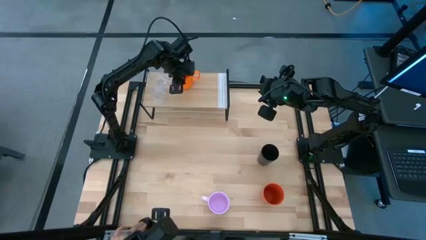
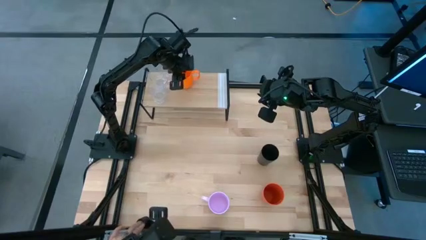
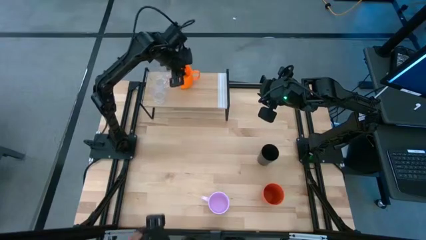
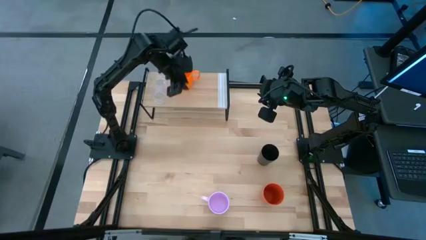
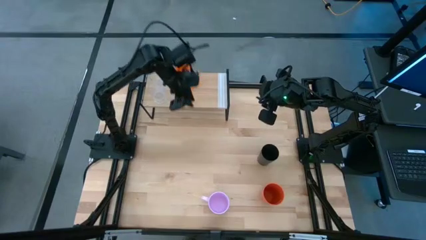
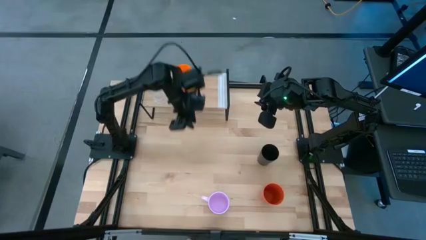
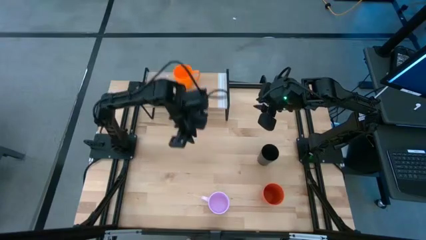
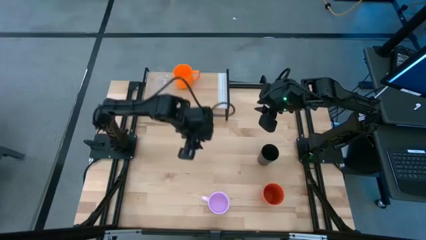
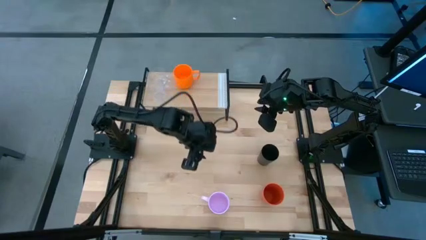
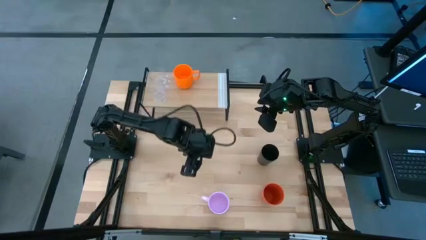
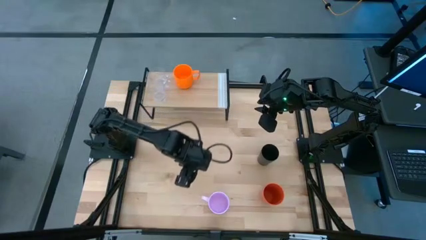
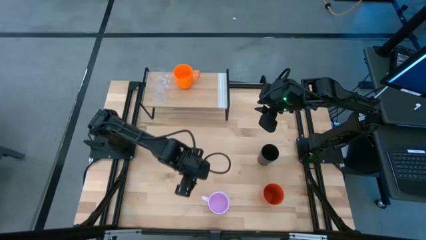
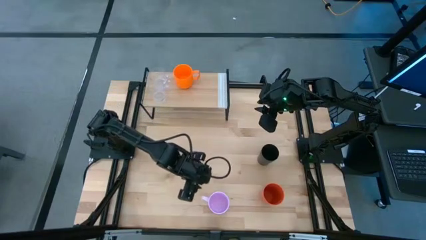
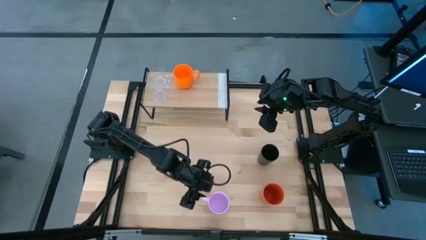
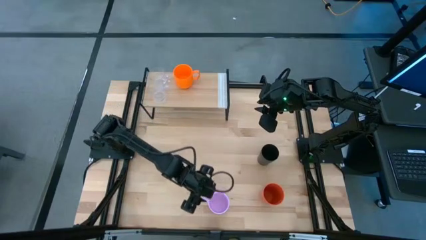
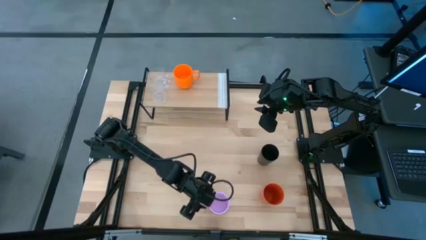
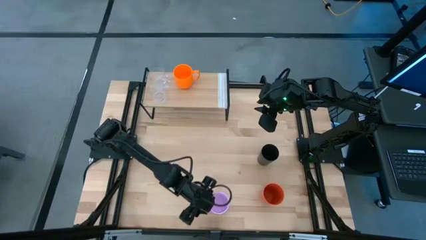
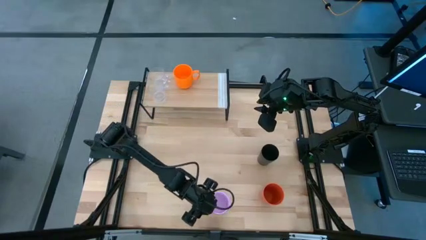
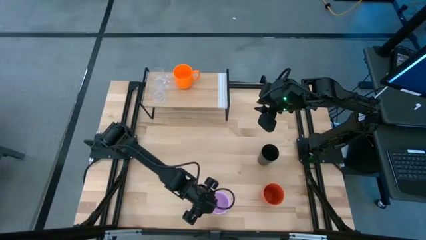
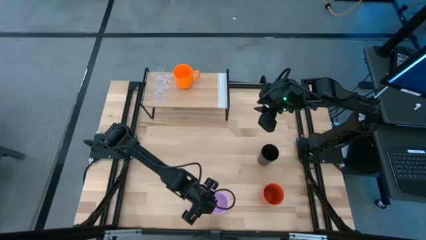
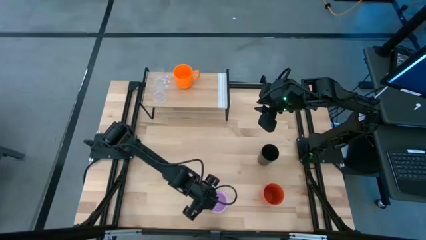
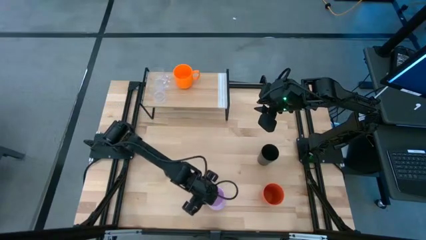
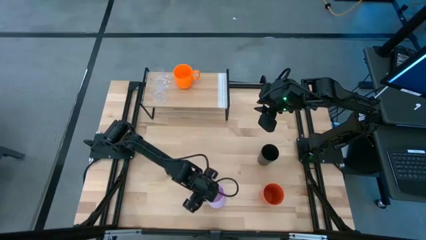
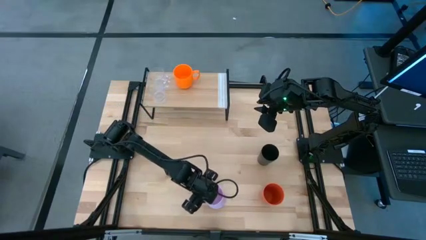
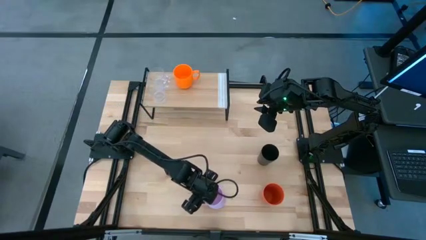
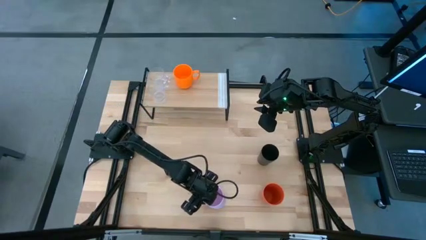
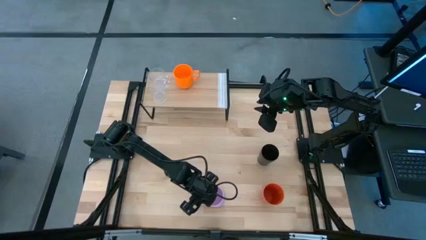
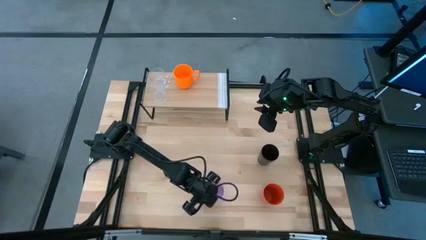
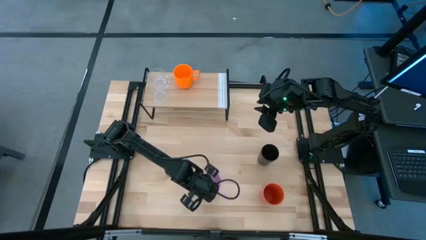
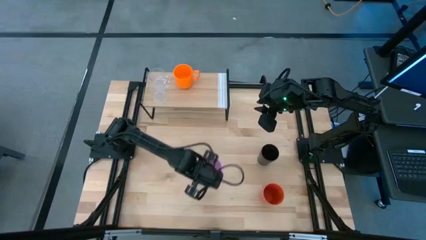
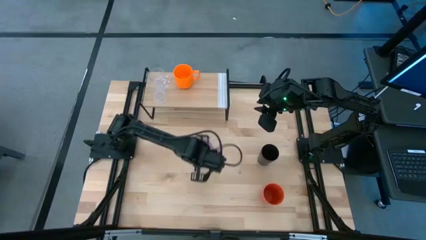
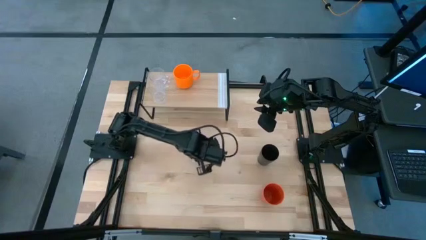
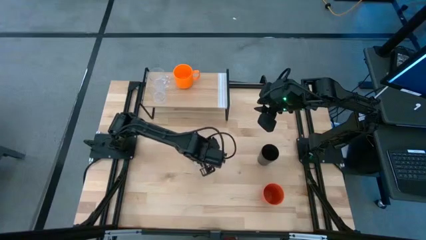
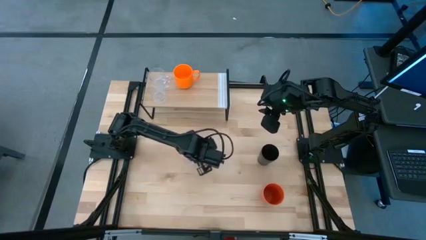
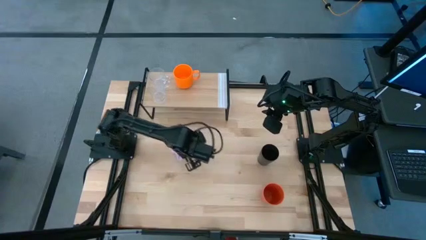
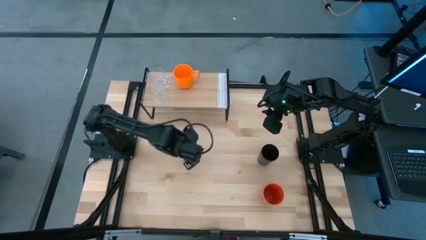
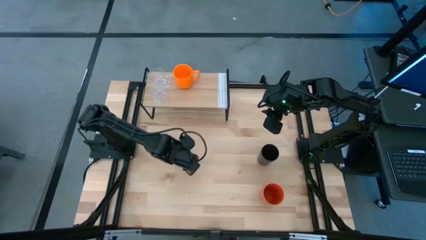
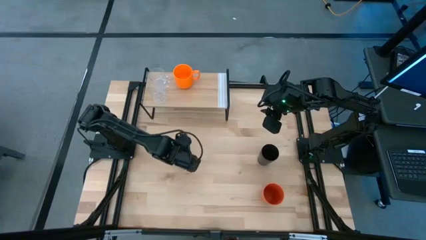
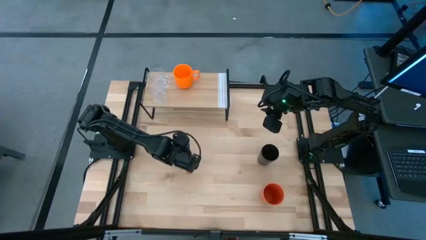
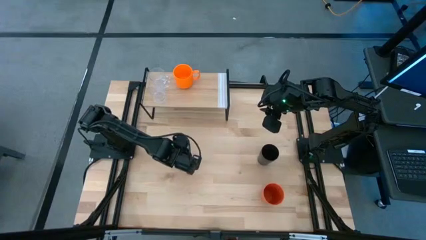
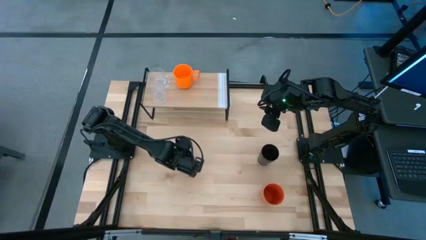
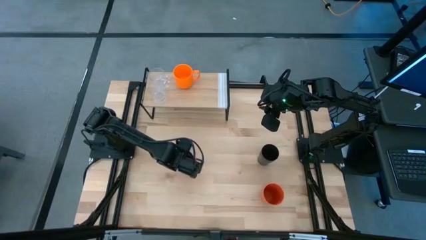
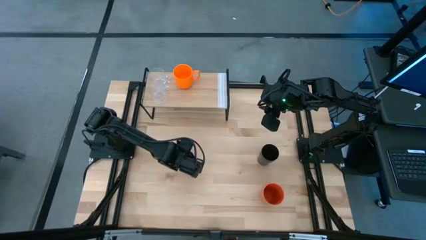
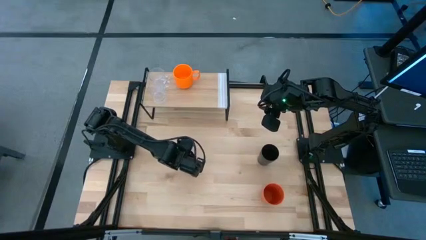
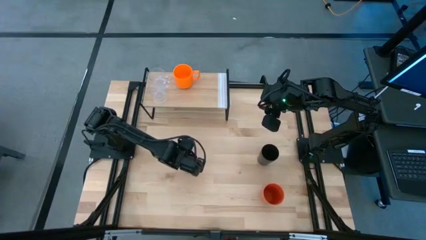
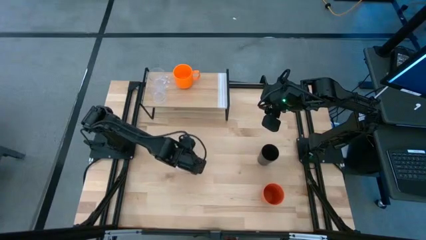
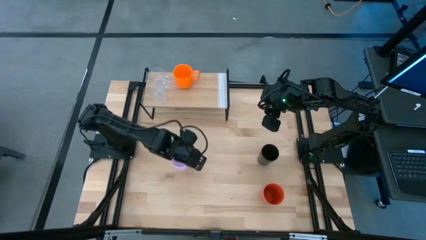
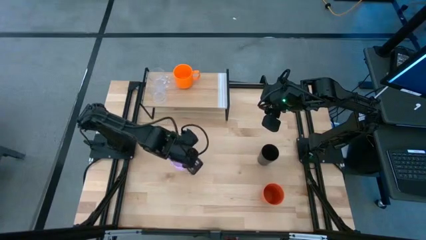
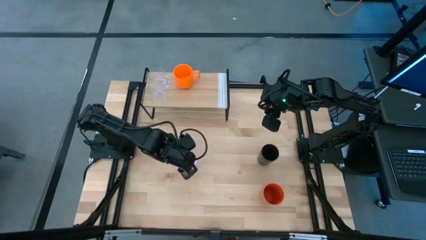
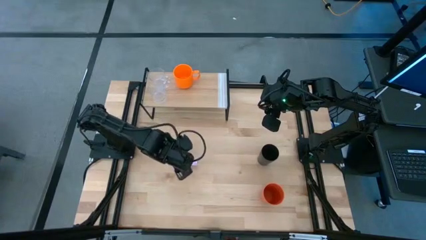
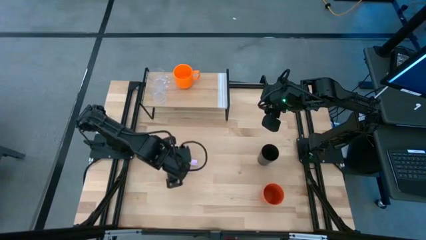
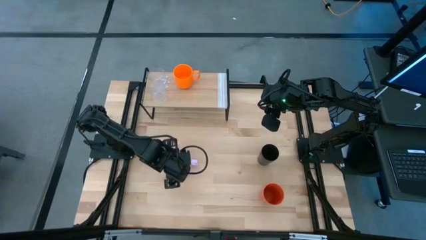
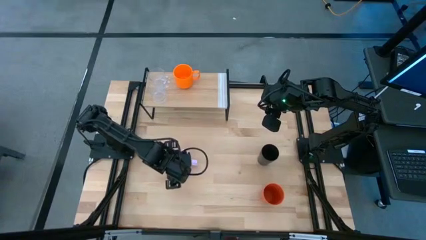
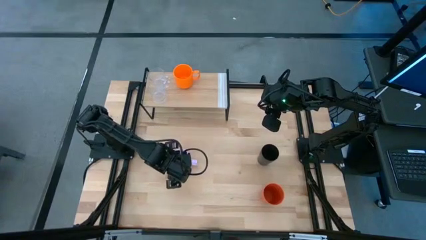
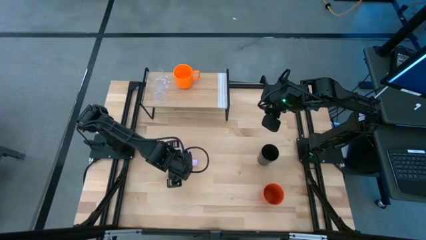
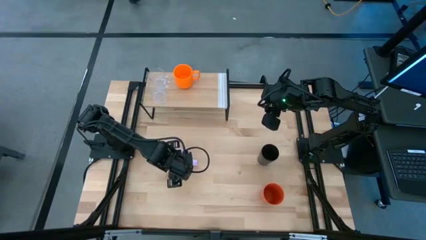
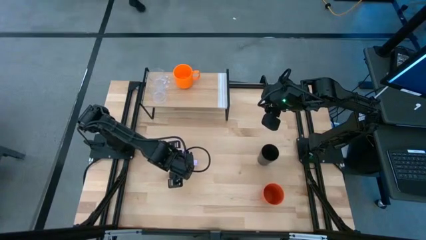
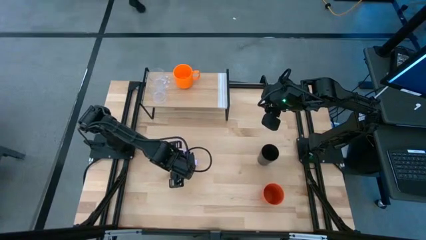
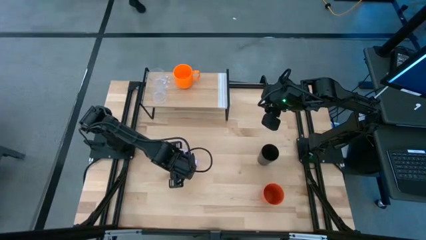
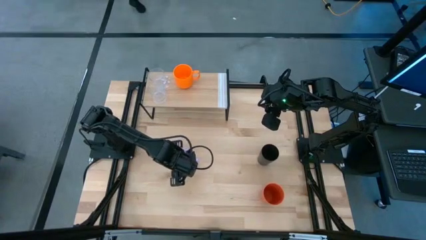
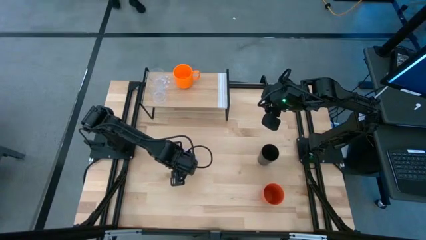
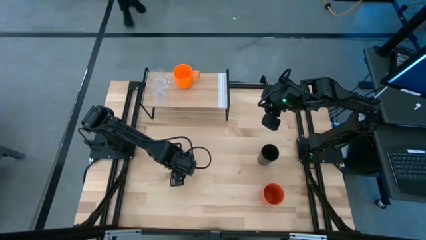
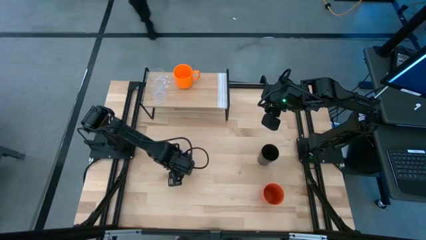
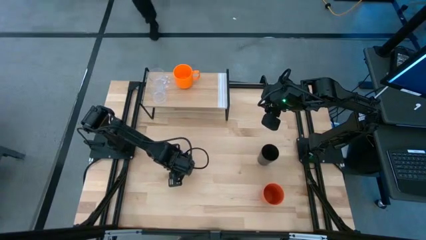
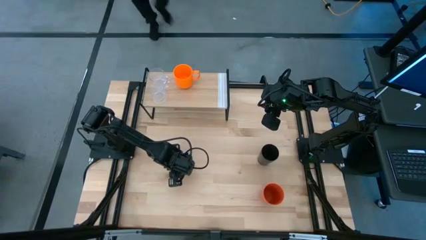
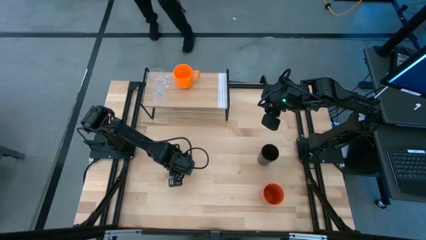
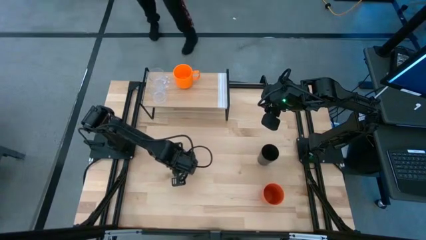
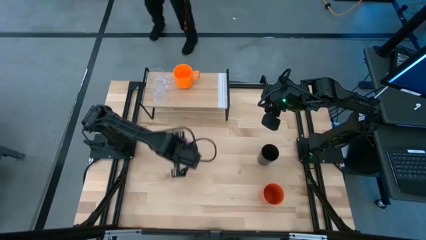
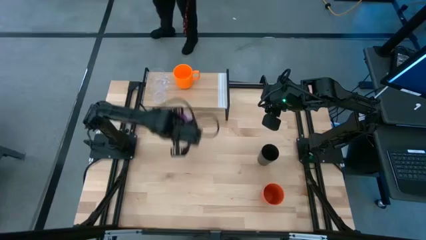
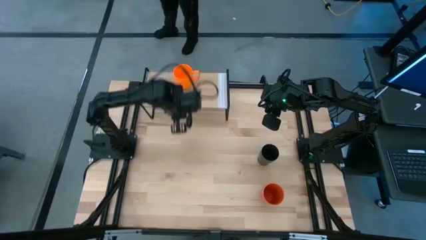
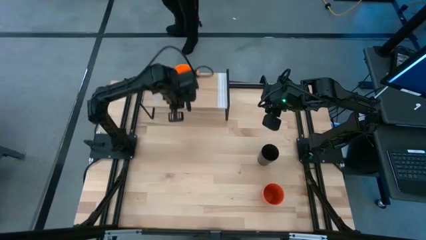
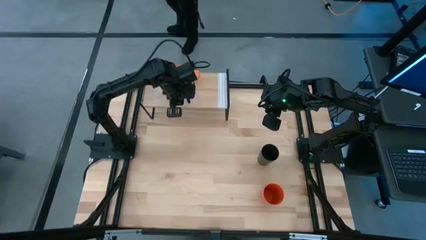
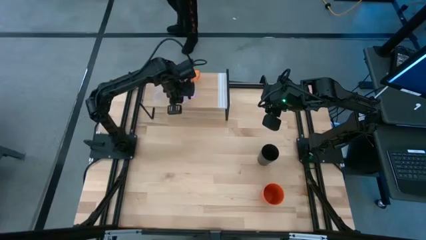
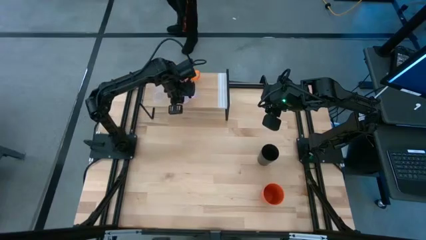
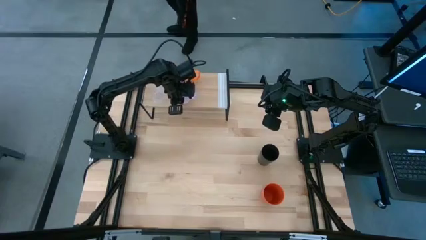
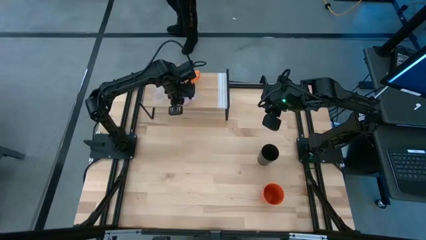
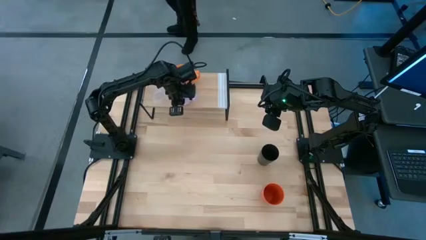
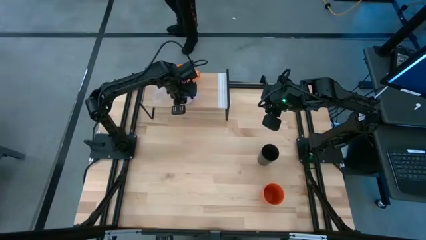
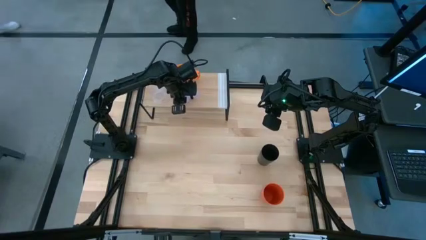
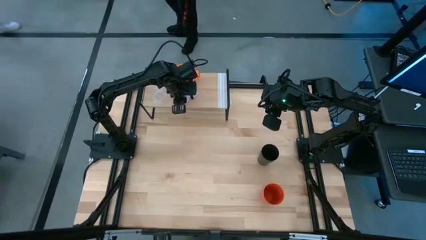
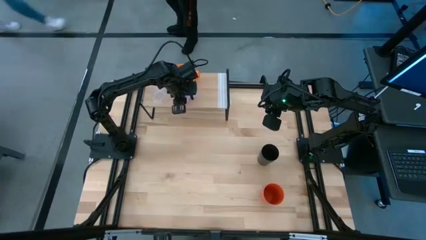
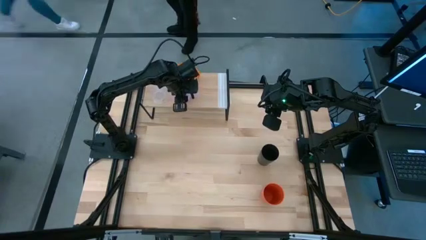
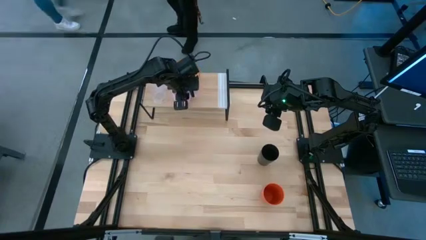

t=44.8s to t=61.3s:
Task: Stack small to large cups/mugs on shelf
Put the purple mug on the shelf
